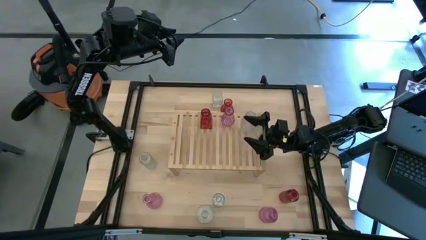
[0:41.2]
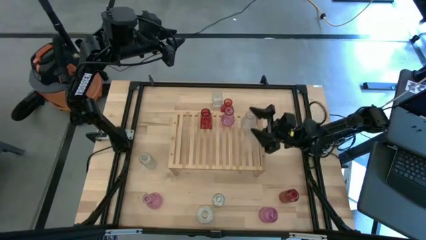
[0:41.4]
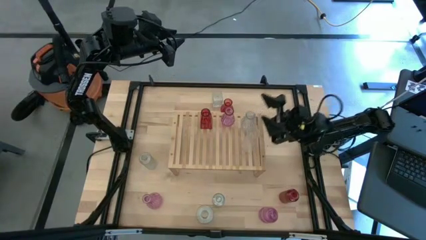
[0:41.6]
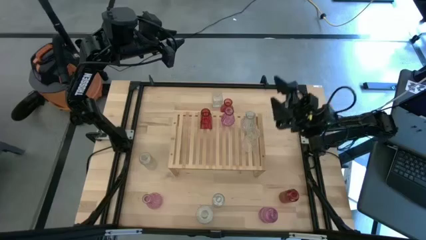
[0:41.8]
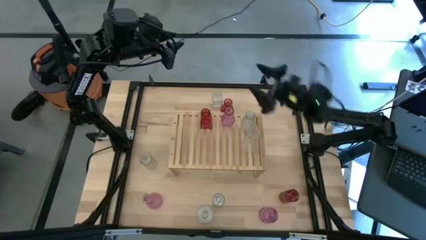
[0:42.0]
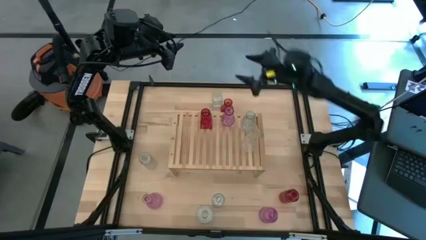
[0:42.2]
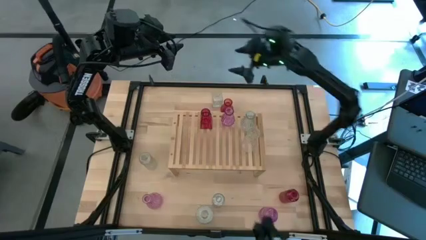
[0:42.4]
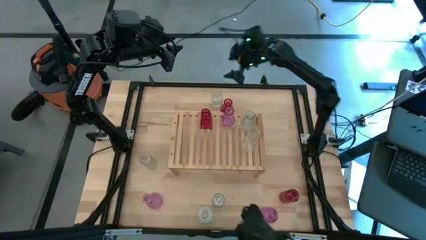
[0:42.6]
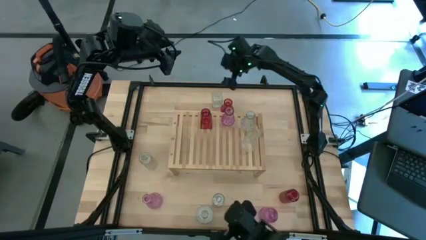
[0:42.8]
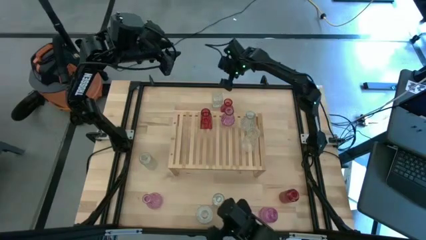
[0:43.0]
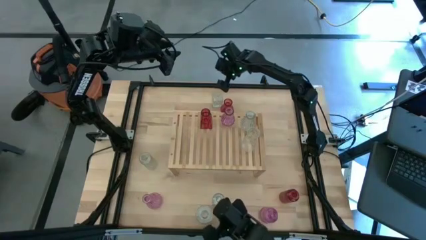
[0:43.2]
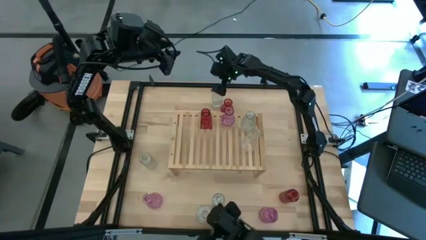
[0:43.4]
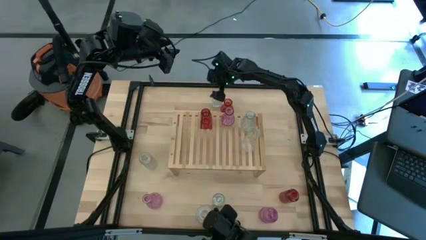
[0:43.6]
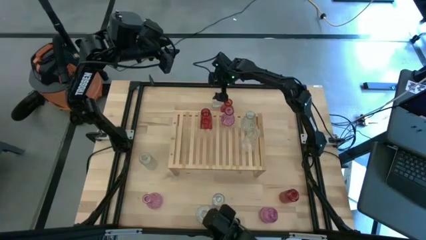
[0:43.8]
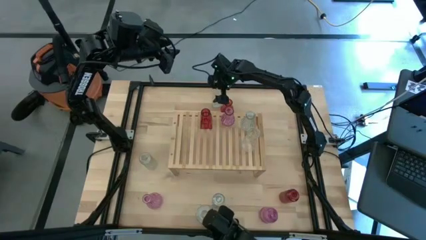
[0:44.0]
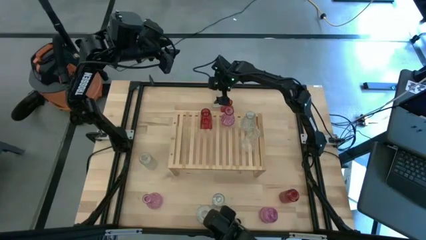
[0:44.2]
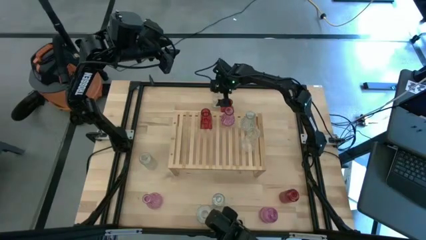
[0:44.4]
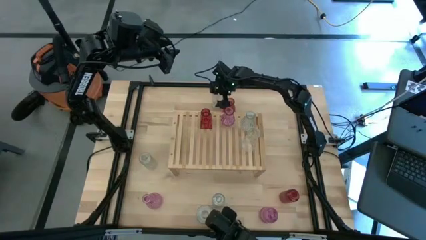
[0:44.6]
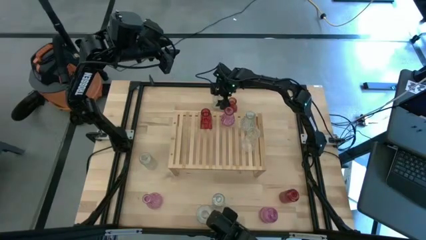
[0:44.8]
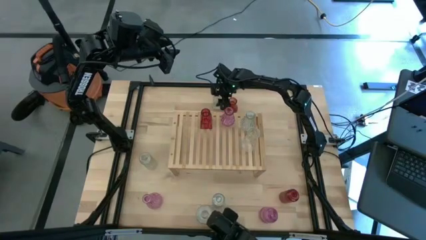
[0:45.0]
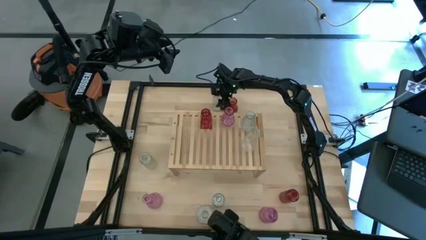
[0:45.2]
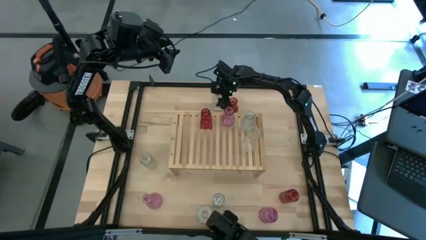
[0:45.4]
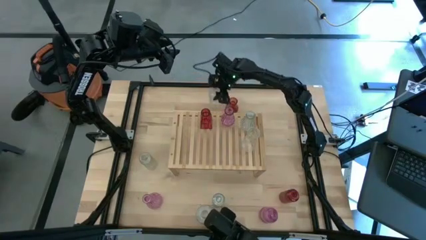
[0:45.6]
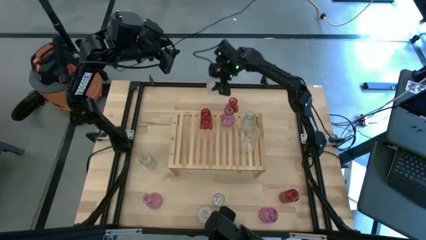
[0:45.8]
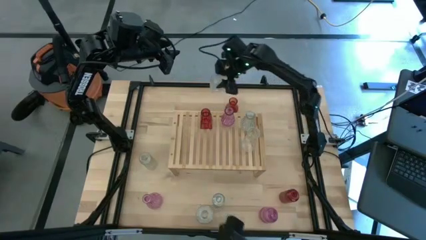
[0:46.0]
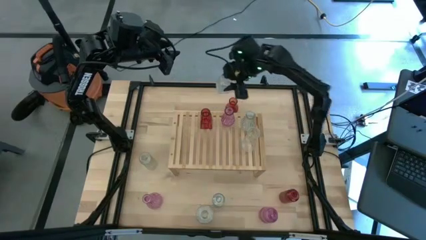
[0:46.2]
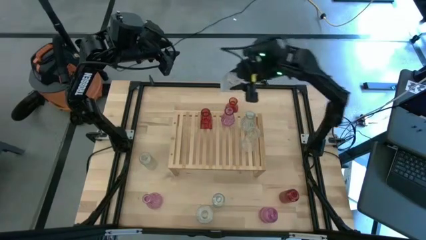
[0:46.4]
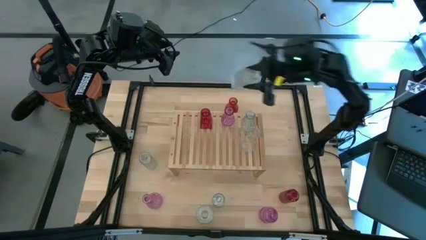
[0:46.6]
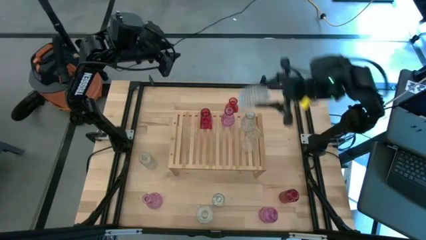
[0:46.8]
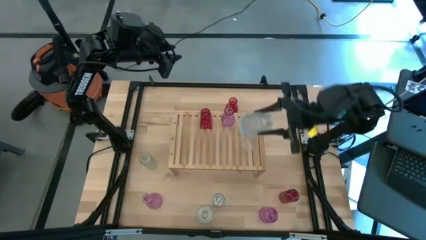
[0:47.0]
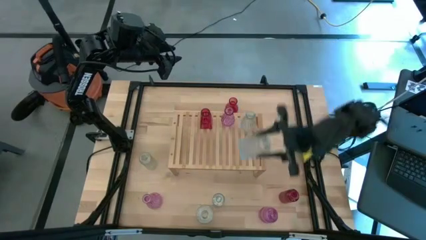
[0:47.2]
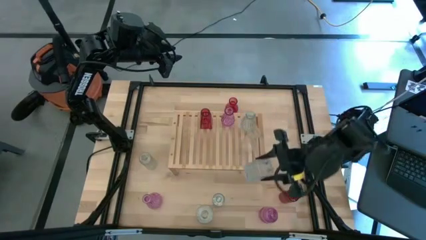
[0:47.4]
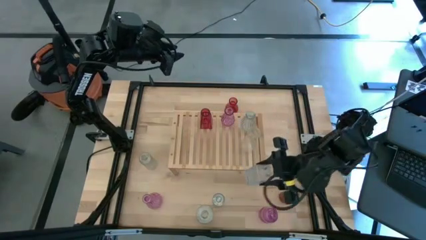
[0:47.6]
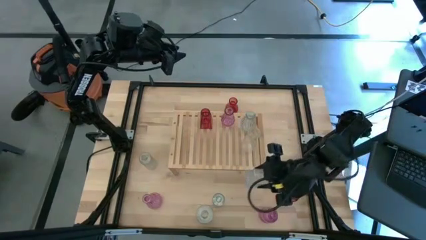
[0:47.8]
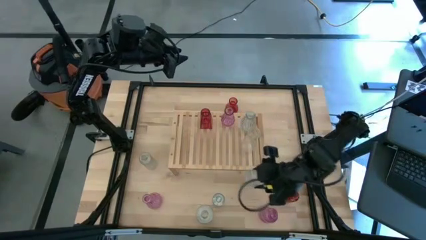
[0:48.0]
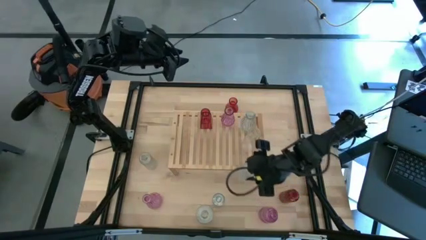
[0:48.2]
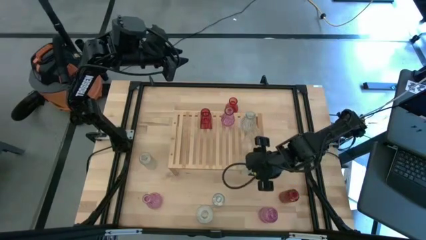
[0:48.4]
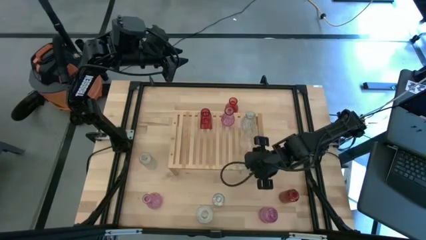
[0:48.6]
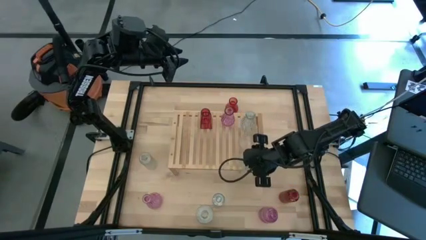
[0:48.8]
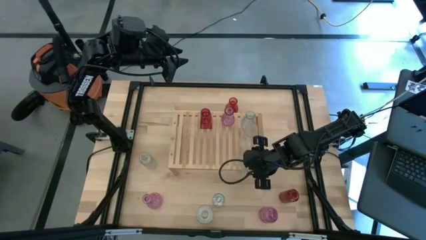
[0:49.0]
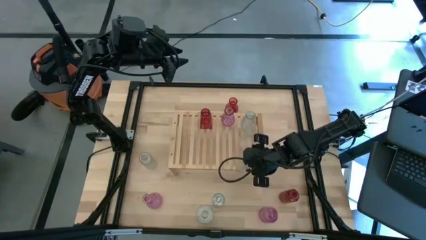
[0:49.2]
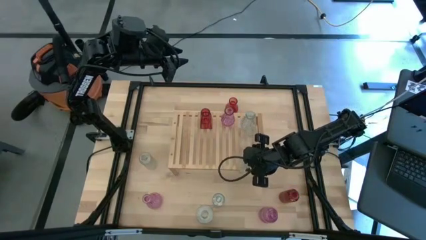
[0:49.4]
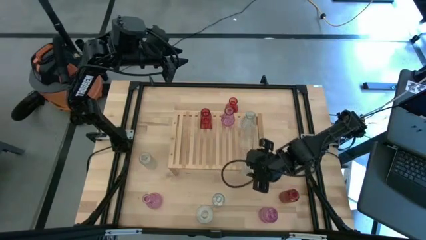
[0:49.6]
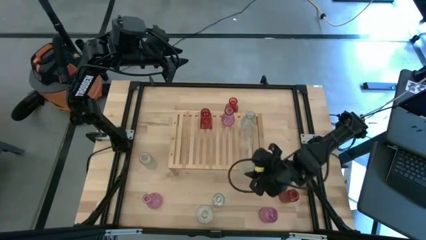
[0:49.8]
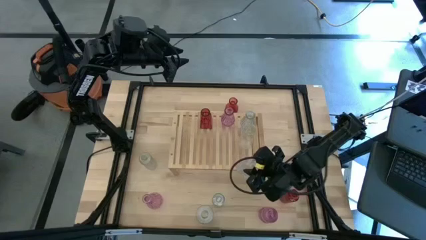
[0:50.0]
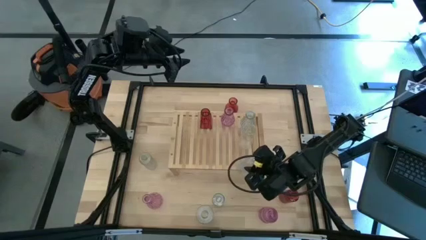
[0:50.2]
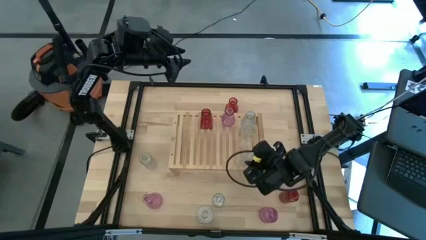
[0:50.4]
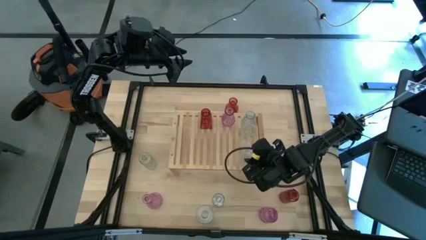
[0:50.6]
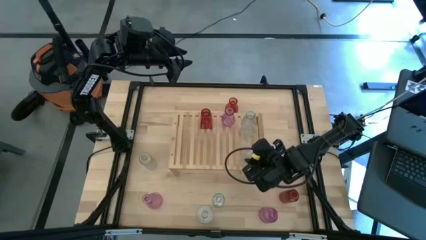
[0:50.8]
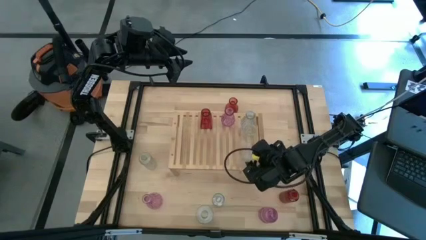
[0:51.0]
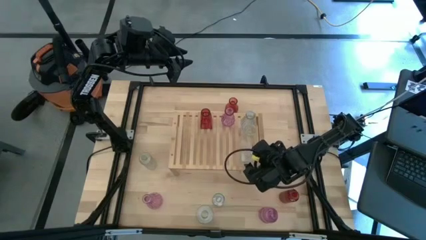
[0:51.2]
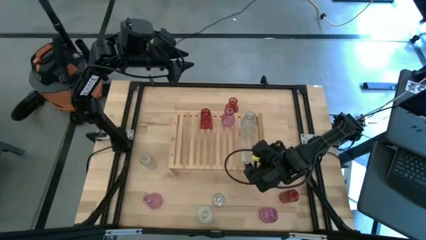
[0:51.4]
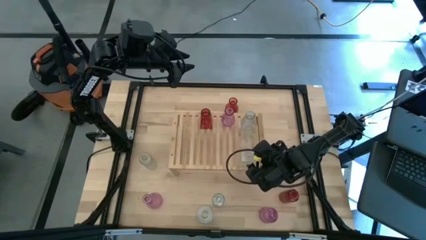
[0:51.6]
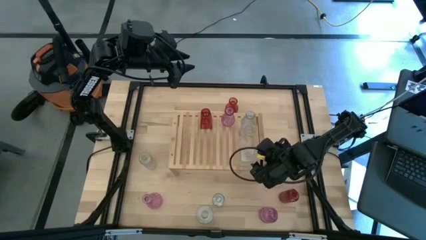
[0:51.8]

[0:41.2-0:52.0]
Task: sort vases onto shelf
Put the transparent vase on the shelf aligned with the other transparent vase

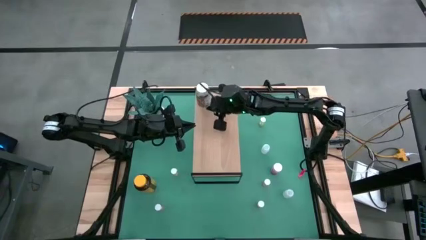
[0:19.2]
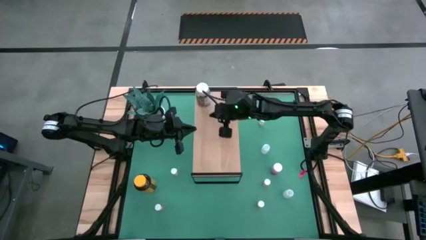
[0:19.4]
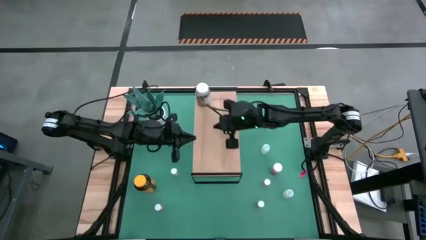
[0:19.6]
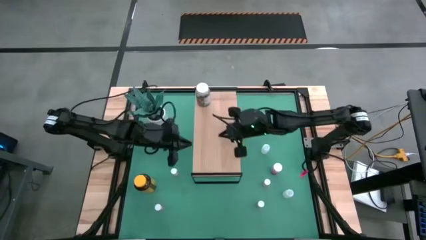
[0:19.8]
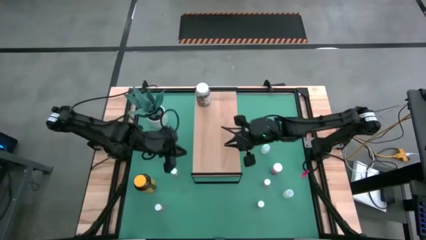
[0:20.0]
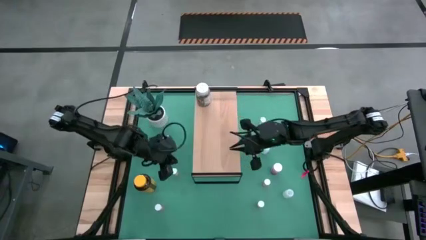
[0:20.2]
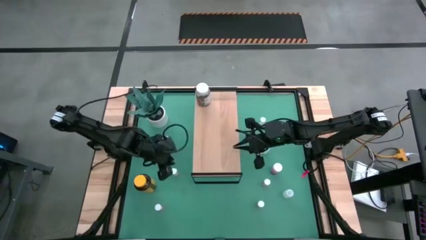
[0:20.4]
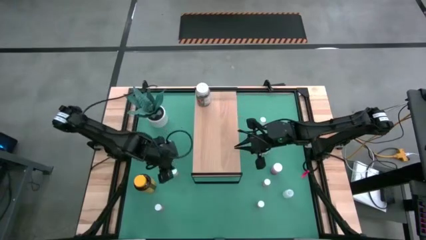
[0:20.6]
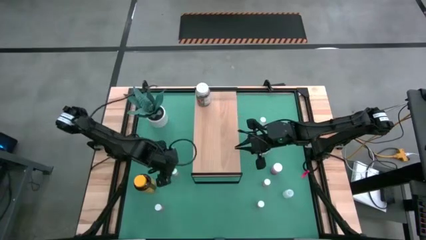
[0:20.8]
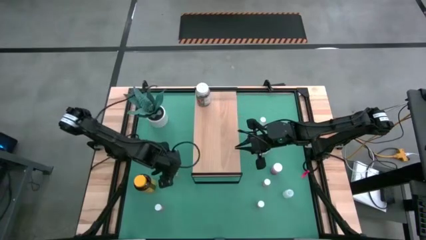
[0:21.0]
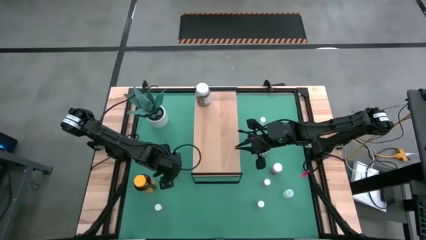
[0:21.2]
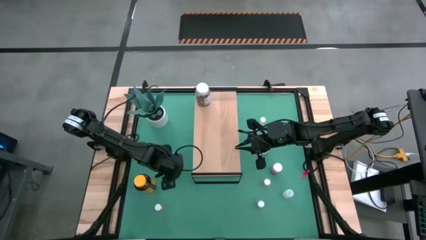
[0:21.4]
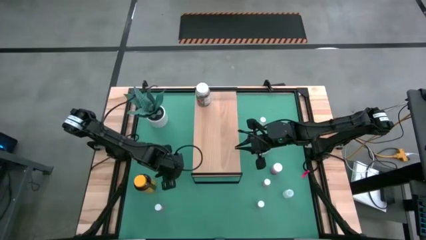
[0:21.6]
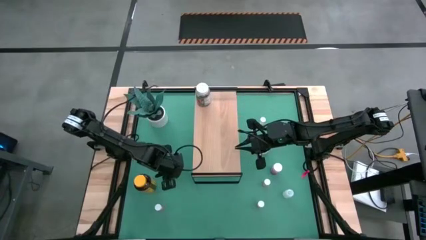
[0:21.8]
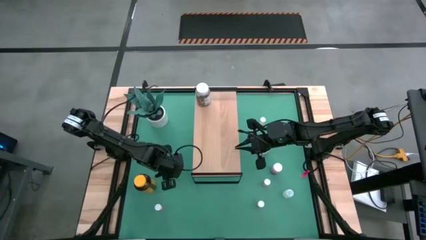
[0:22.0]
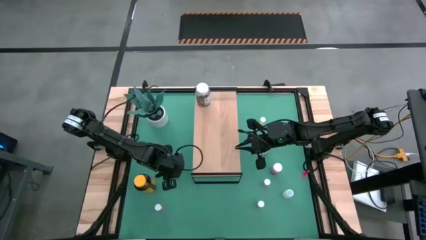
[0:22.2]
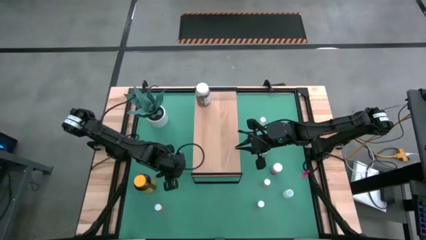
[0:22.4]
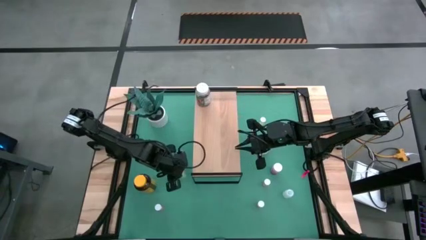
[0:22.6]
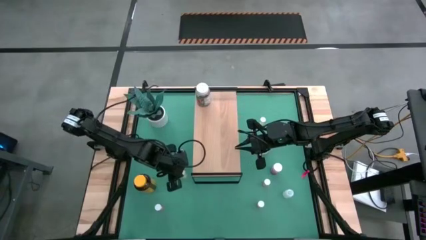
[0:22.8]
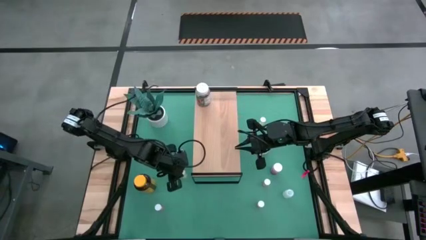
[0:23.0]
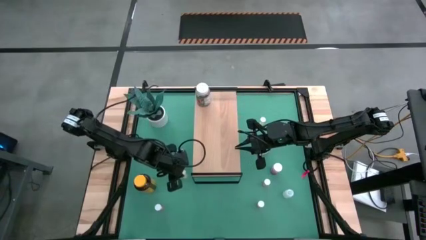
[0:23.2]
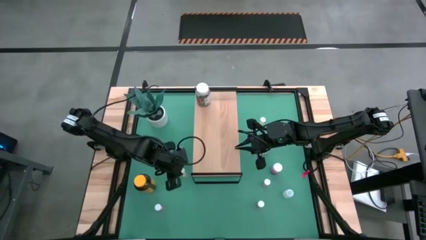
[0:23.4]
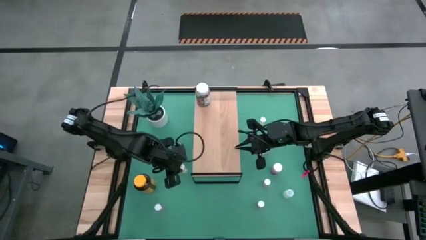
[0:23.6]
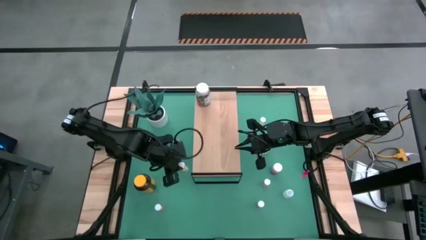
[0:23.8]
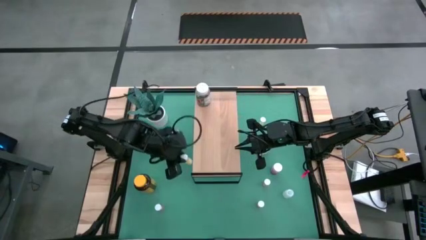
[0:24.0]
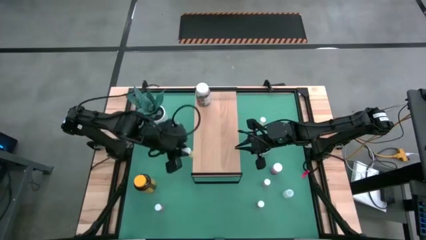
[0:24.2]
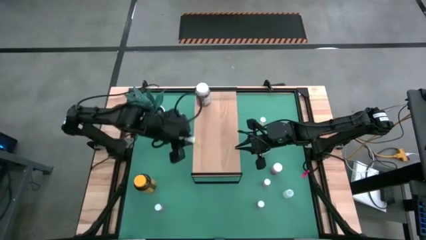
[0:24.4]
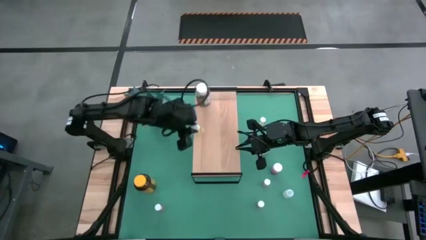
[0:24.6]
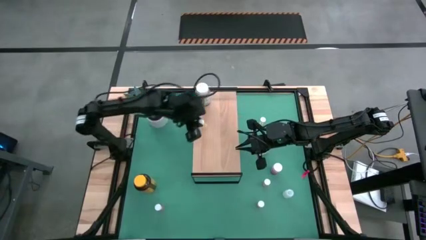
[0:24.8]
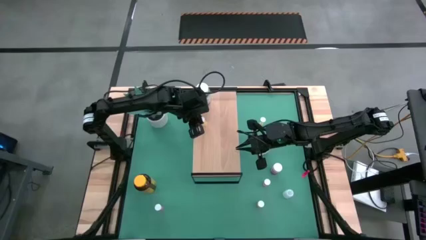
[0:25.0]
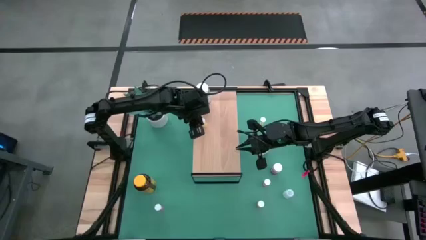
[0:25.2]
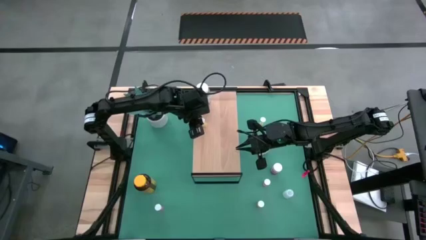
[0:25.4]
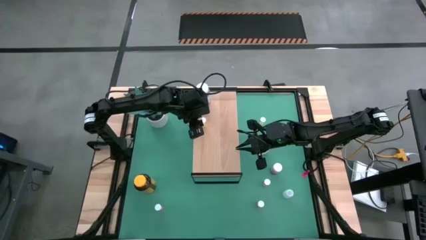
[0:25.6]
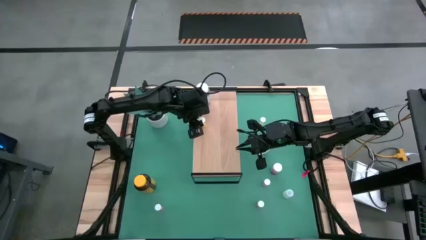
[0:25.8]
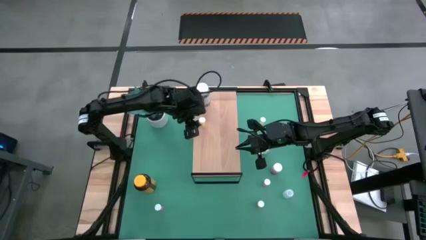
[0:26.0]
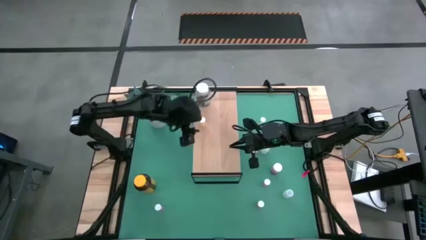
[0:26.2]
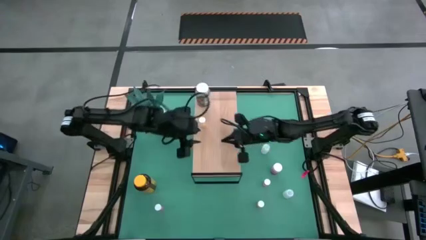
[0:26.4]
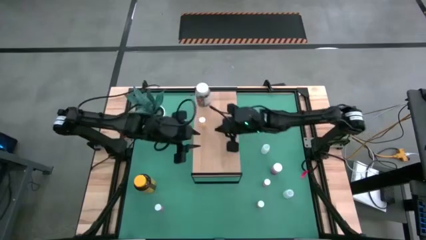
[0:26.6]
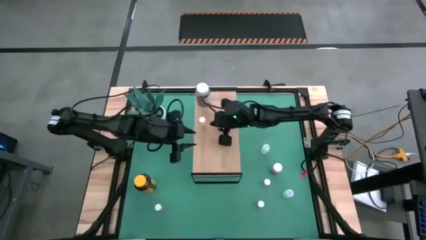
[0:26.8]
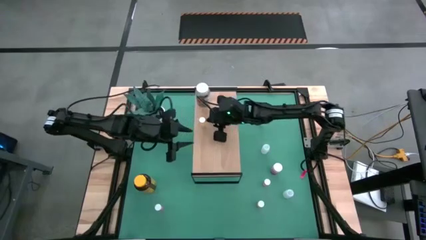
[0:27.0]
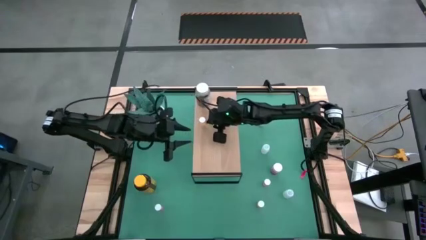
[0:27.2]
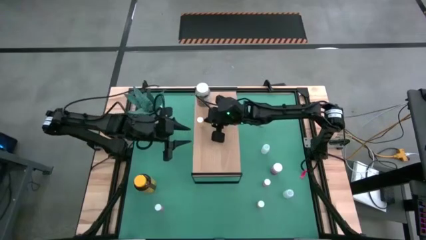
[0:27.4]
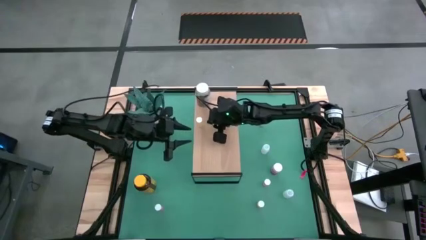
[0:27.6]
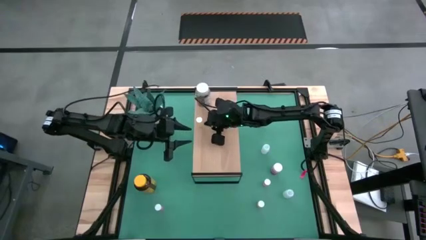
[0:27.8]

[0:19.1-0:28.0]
Task: Pick and place medicine bottles onto shelf by color
Put the light yellow pill bottle on the shelf
